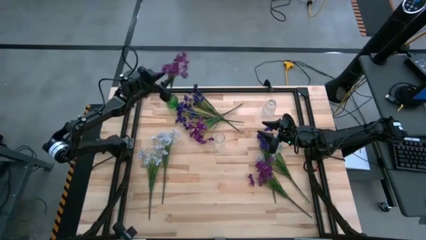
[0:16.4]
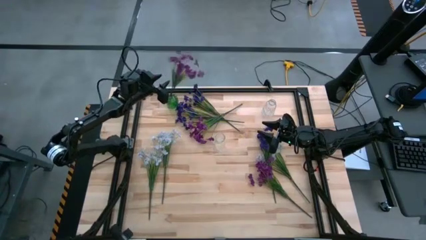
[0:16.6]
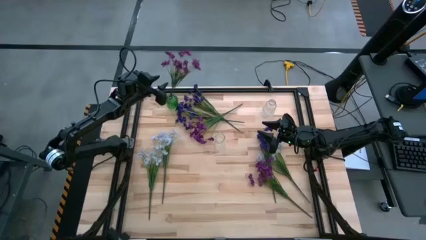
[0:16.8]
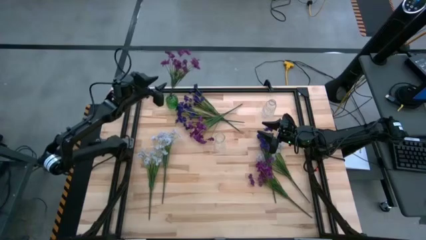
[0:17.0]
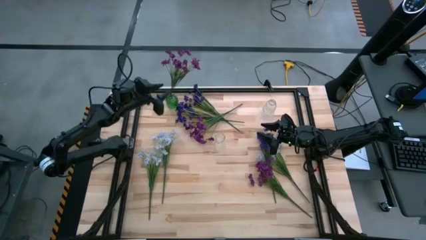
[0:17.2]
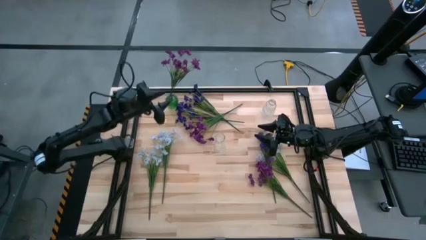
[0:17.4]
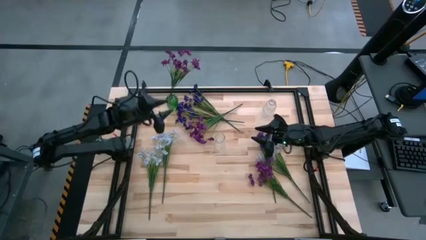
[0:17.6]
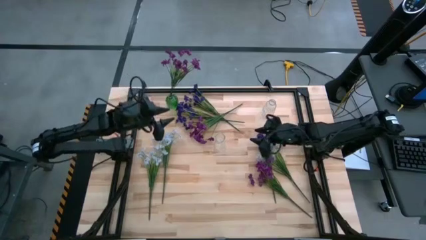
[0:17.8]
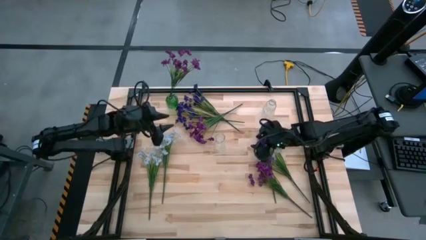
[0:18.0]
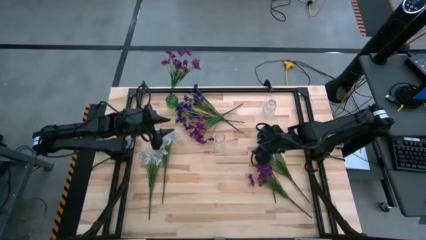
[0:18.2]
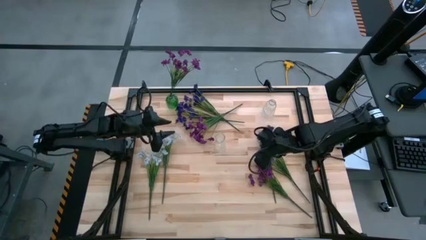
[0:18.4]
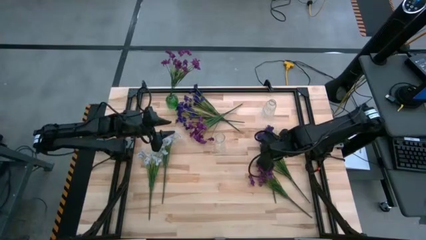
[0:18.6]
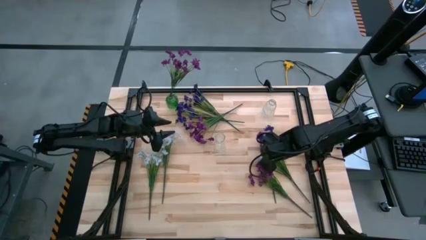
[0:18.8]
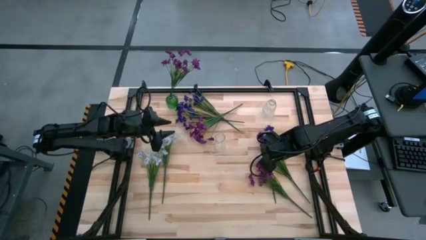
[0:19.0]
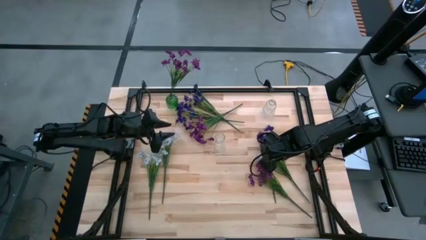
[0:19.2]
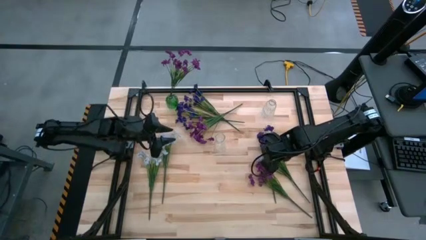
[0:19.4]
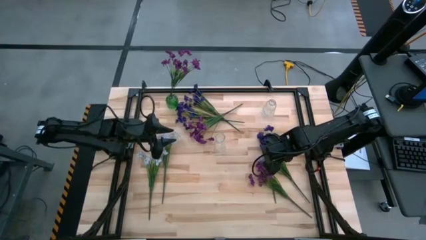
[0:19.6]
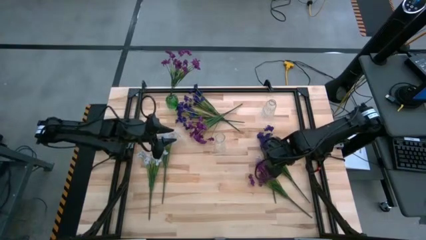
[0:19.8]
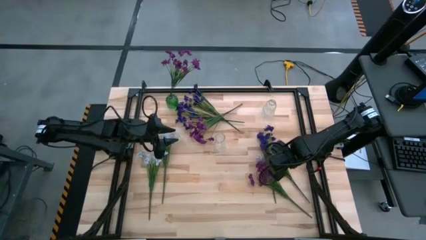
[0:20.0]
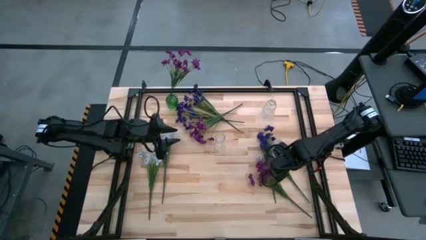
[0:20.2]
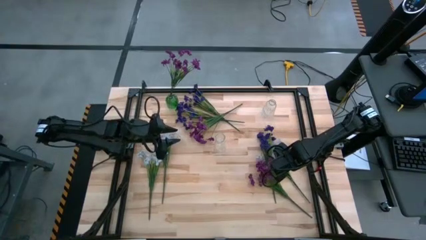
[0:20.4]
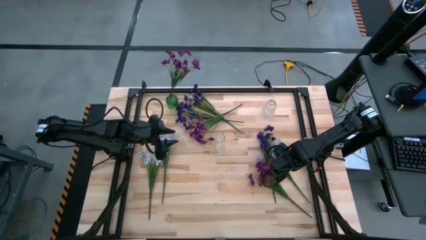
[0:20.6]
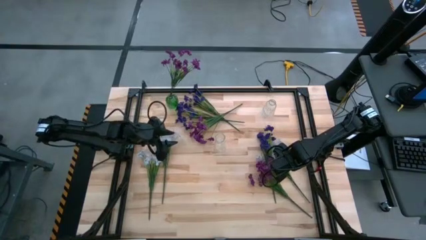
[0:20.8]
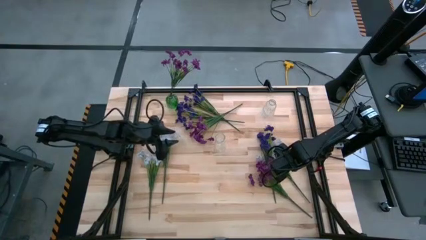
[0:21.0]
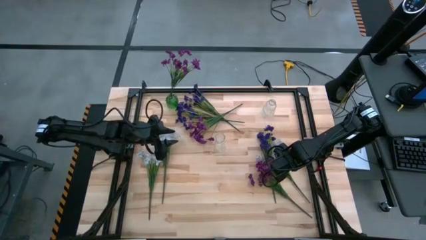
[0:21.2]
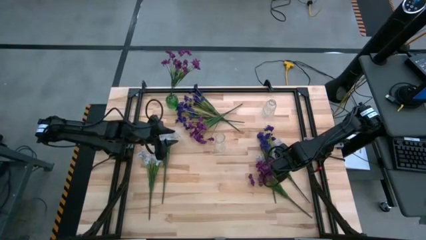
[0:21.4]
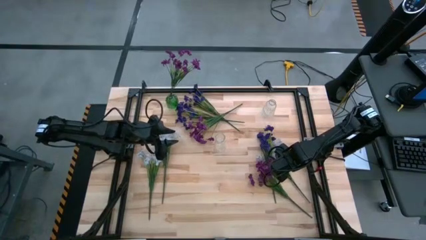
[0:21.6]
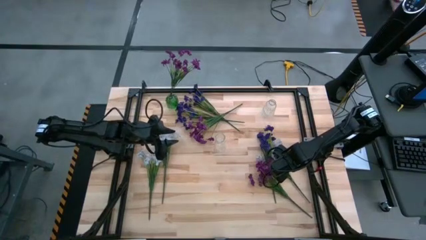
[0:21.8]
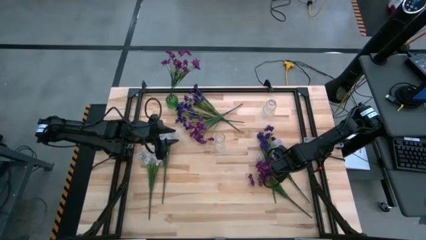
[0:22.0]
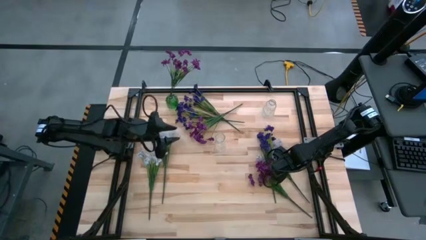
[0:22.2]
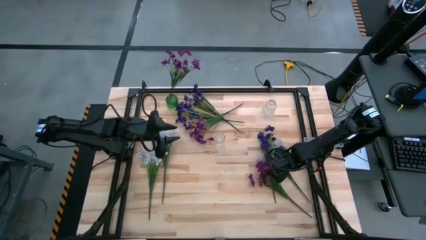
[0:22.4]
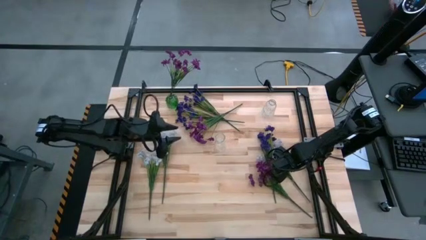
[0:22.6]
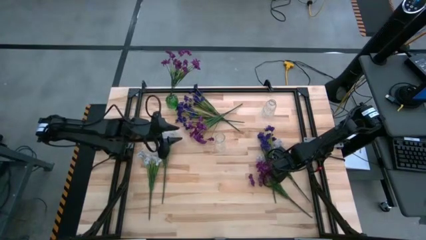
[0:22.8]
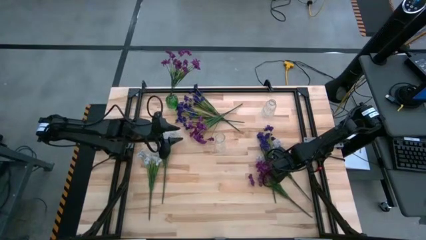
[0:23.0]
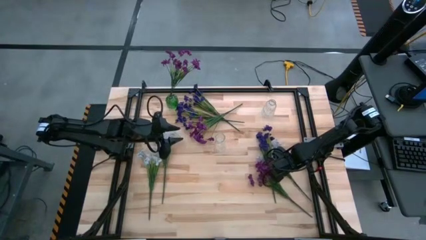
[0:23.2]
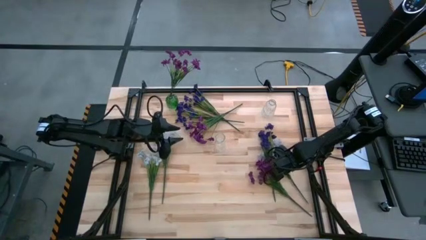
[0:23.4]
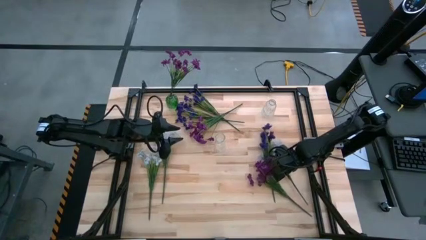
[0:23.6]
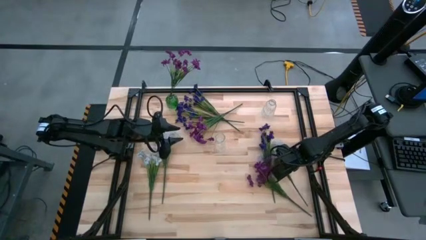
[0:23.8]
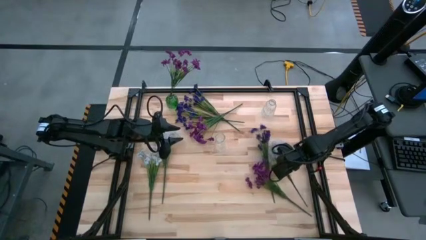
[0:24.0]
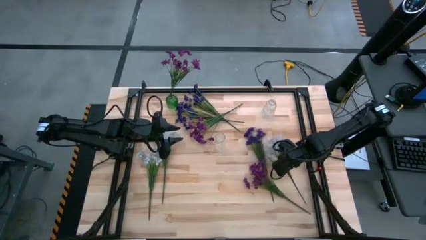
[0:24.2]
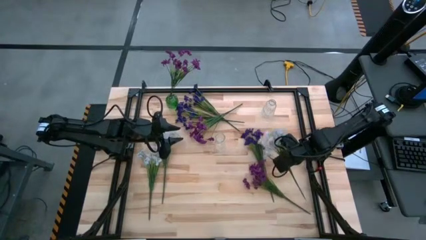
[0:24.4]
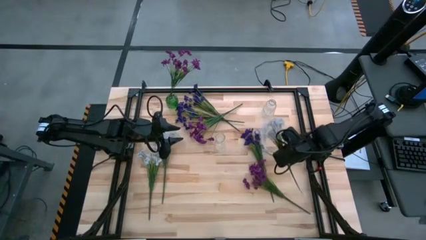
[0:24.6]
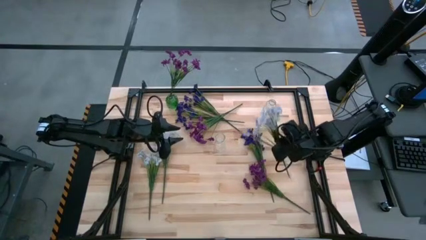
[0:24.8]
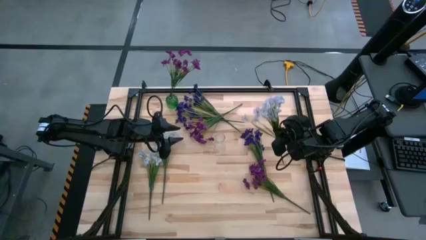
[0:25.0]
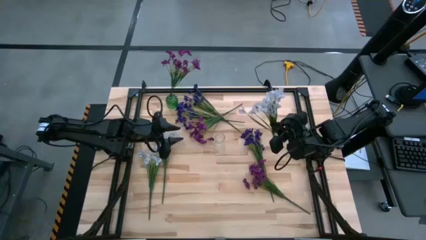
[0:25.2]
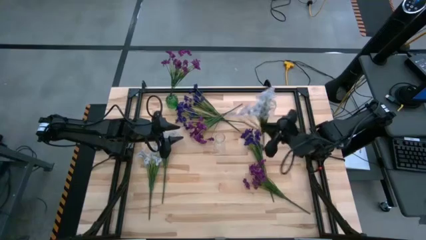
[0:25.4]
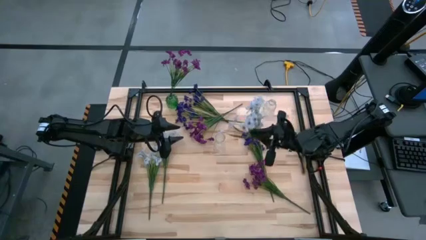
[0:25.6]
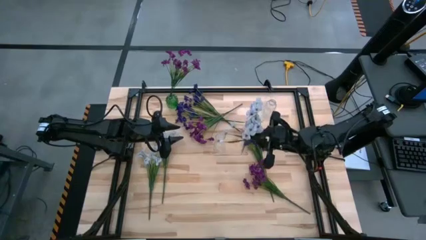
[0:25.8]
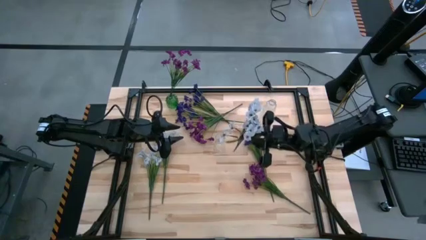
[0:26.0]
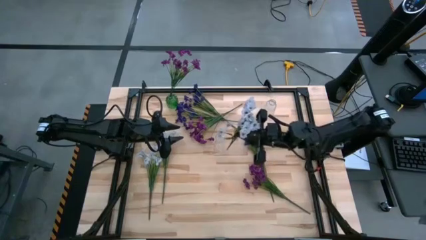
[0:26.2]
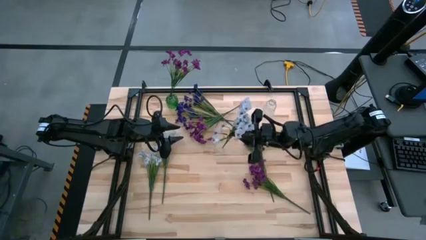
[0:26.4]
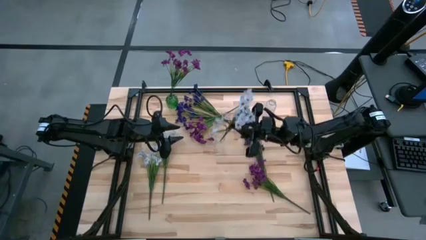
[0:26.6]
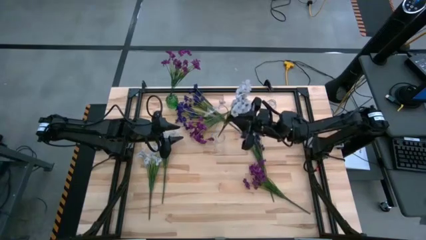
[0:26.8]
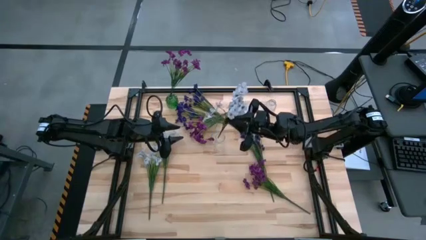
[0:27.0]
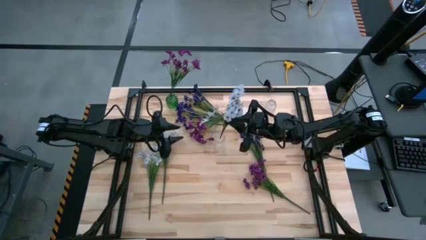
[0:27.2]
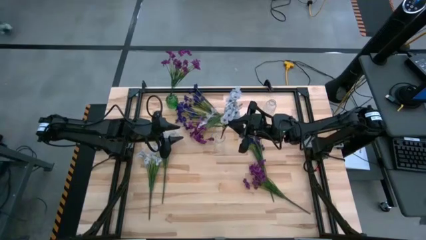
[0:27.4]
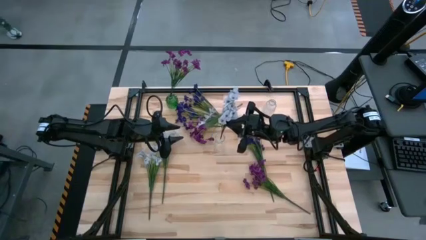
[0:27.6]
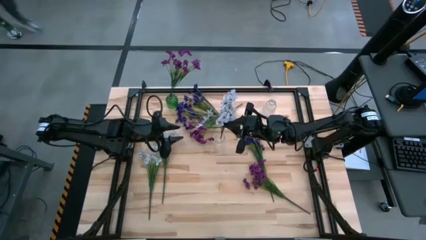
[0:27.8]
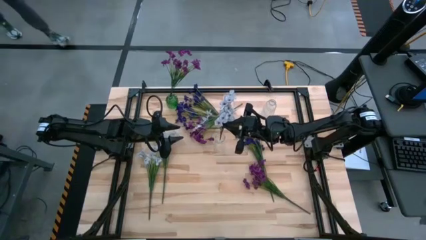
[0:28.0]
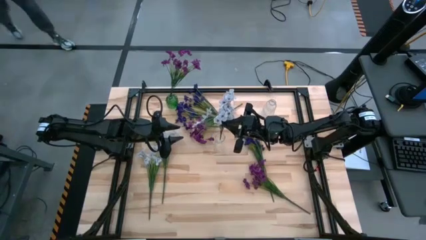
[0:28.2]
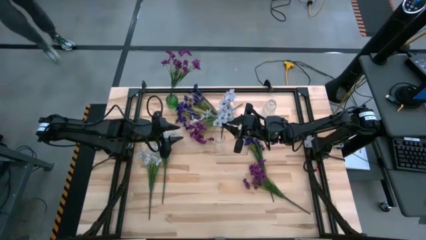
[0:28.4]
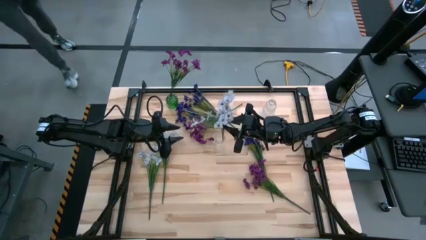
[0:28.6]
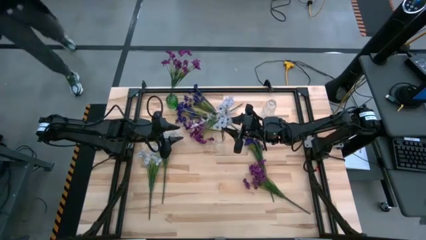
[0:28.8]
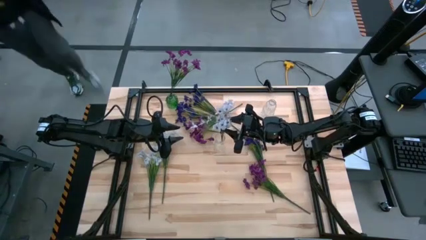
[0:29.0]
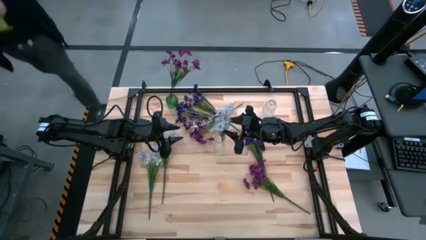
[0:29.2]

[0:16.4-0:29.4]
Task: Sort flowers into vase by color
Put the right white flowers into the bottom transparent flower vase
